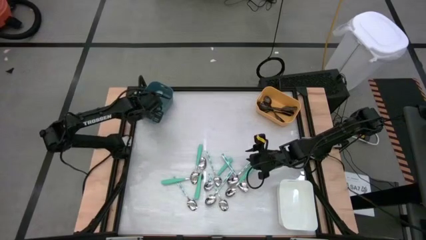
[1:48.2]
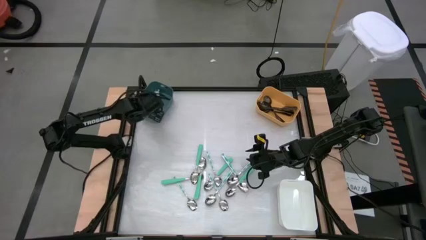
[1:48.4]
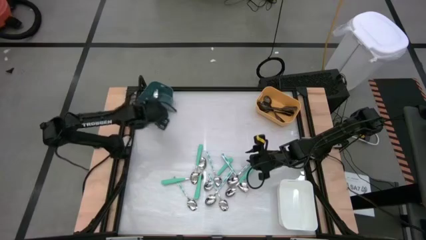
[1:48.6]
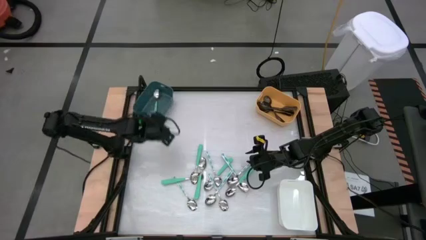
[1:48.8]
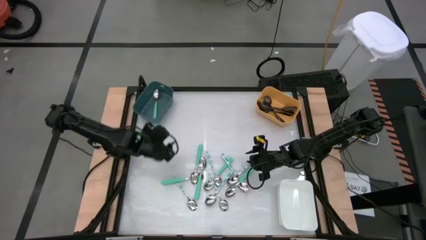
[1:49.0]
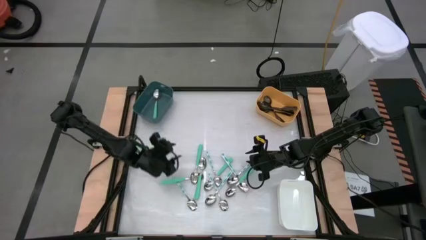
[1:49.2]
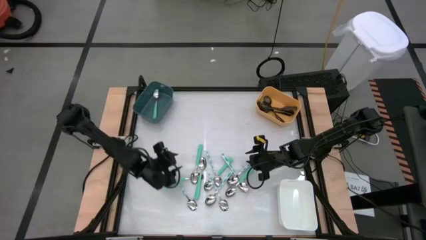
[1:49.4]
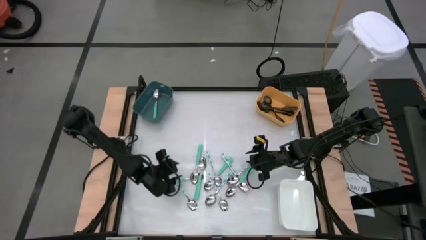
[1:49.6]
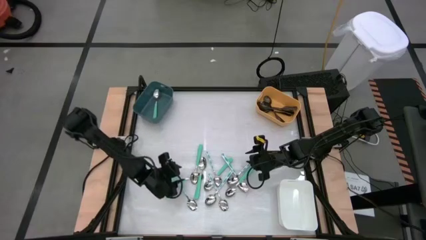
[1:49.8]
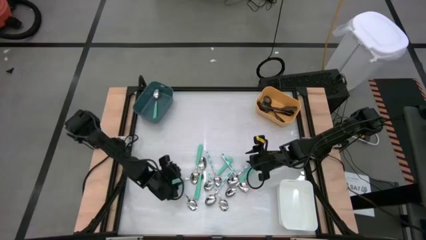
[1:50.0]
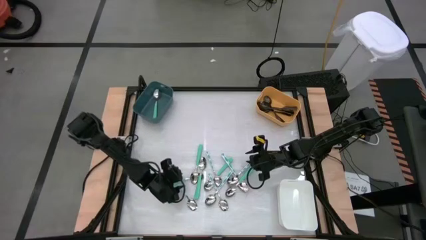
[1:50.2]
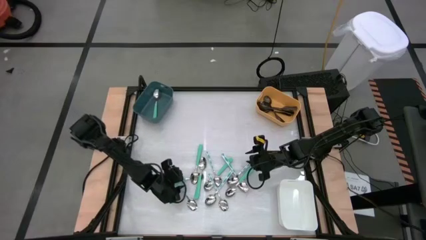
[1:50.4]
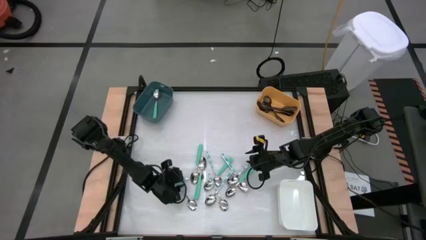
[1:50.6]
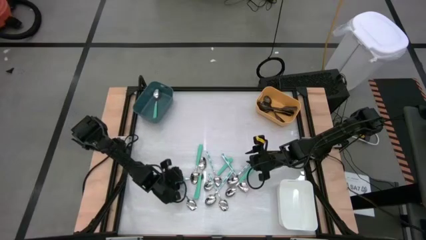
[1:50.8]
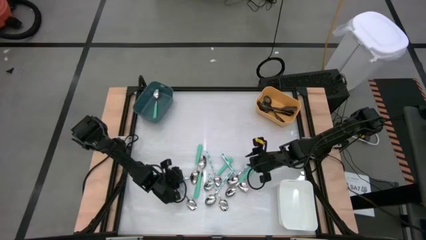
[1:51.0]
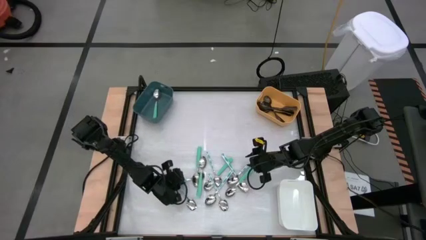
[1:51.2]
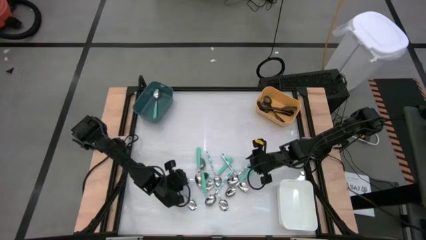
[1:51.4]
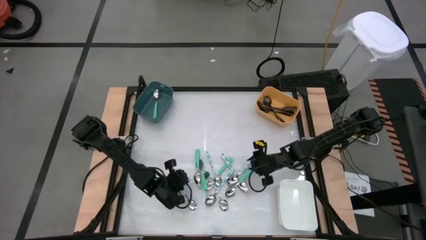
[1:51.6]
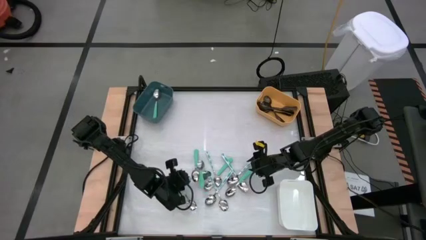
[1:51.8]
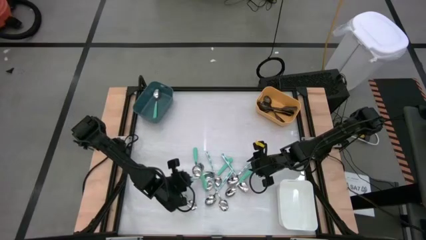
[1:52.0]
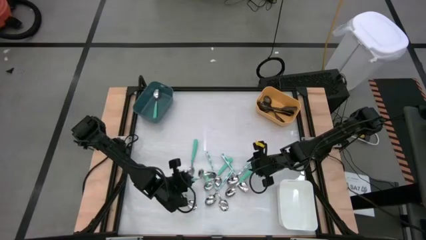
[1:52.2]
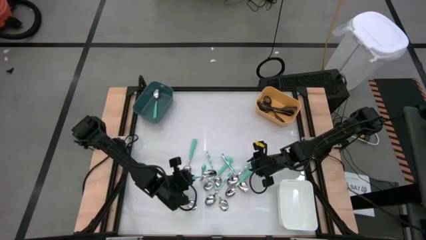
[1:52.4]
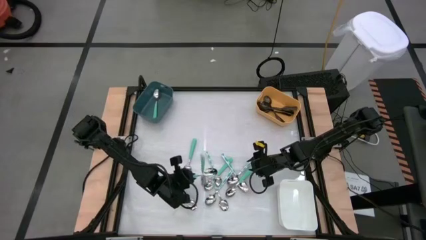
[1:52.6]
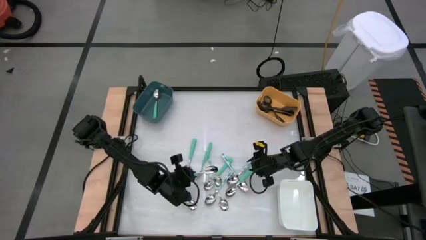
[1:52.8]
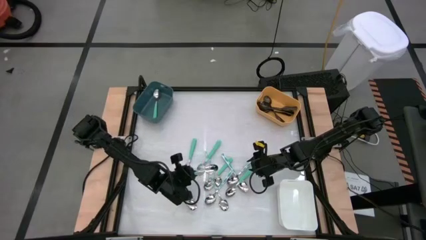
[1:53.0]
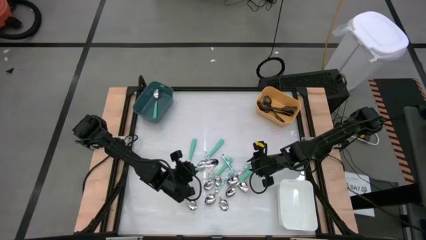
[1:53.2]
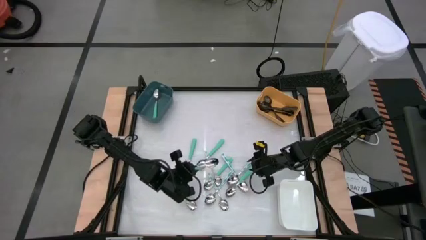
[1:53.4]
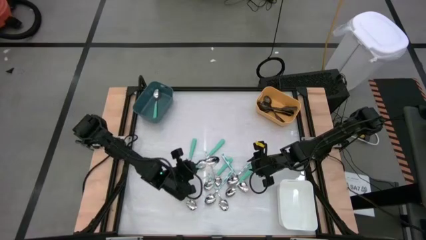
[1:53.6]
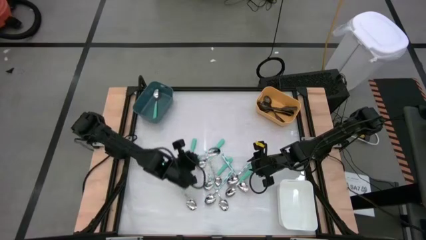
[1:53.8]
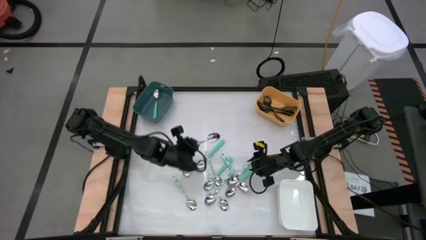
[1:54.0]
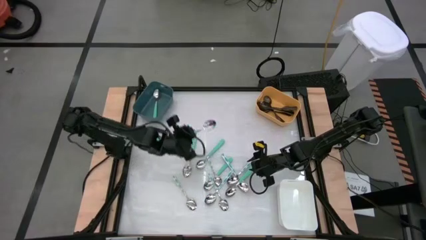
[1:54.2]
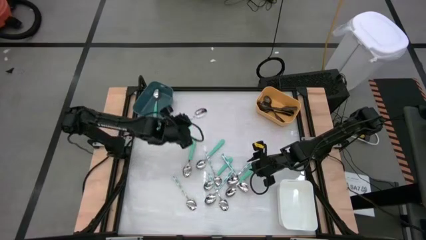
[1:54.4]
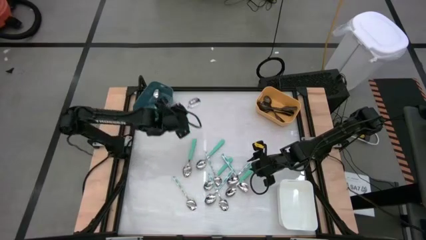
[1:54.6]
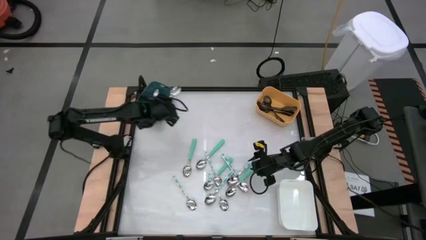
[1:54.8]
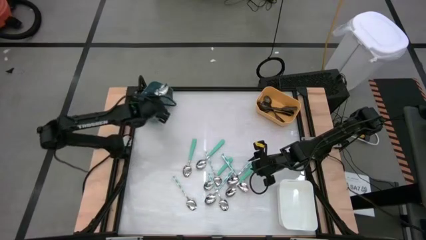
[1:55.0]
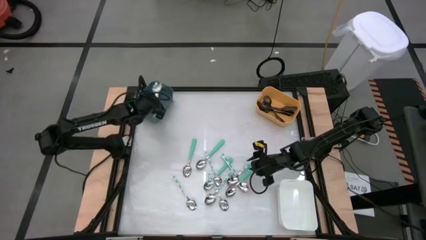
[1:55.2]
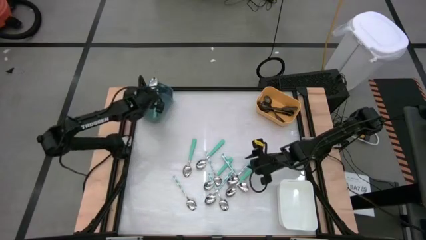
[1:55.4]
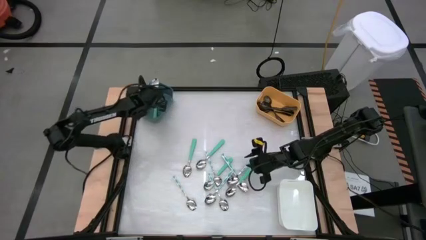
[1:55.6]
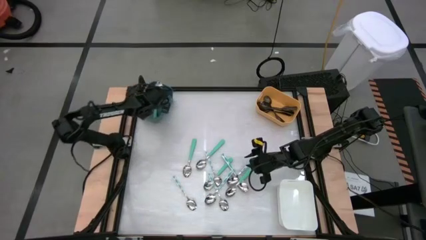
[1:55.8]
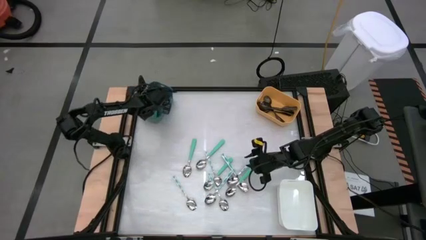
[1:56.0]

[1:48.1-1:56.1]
Task: Sort silverware by color (type)
Put the green spoon into the blue bin

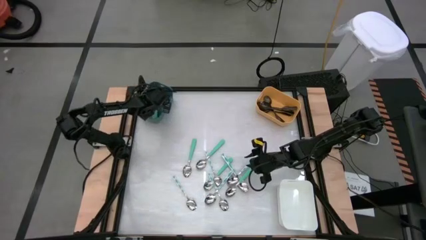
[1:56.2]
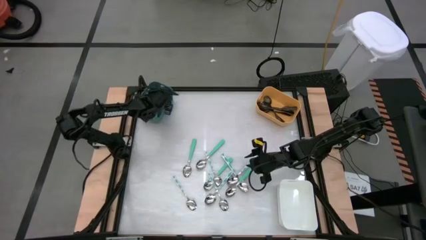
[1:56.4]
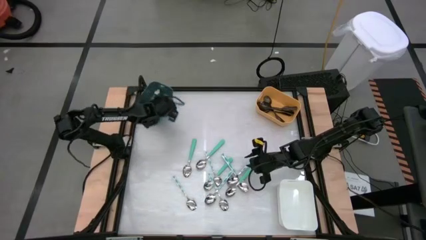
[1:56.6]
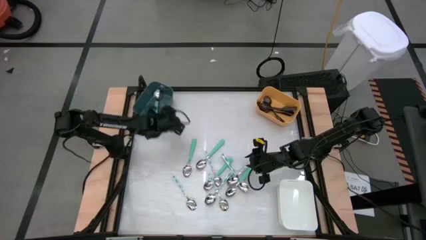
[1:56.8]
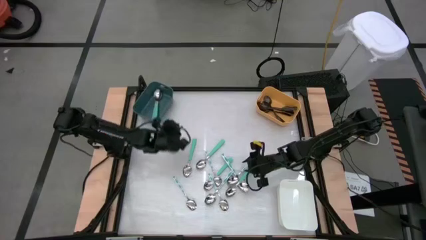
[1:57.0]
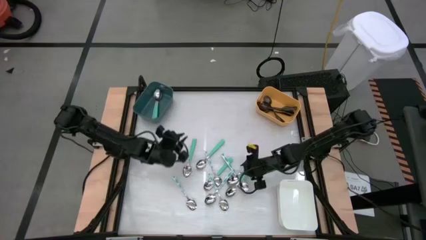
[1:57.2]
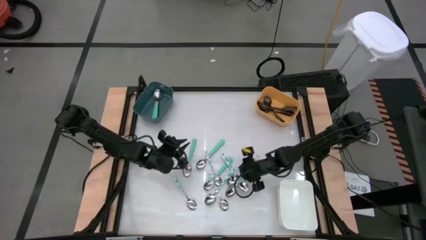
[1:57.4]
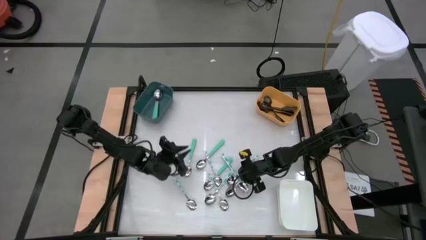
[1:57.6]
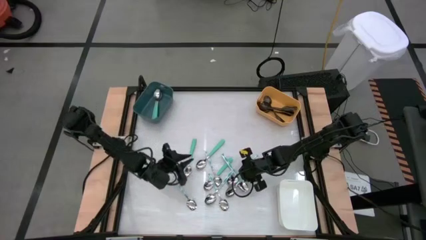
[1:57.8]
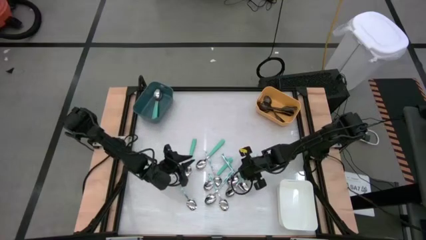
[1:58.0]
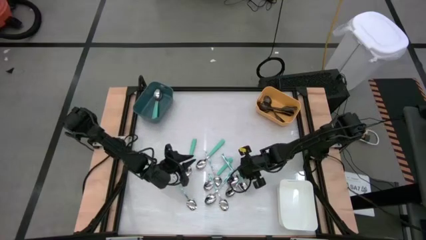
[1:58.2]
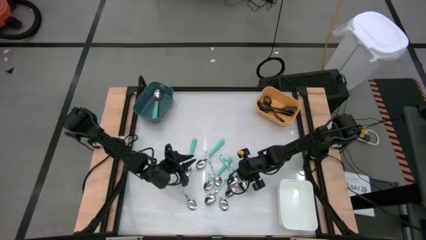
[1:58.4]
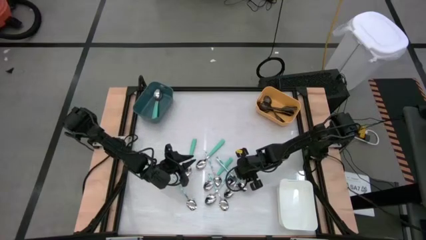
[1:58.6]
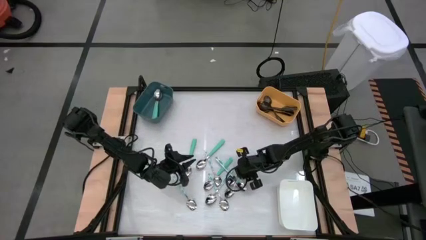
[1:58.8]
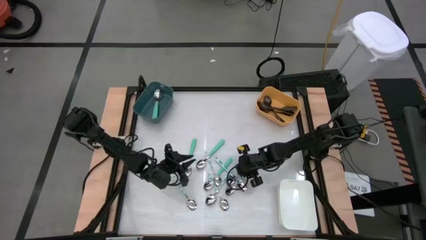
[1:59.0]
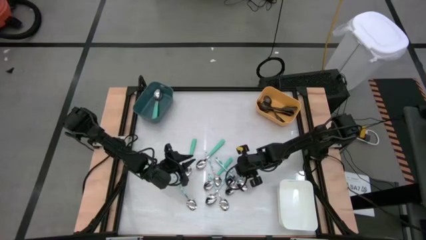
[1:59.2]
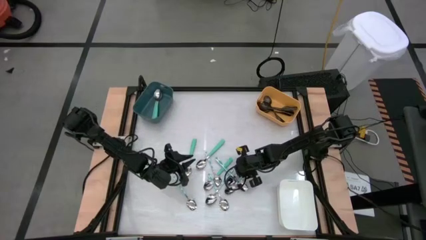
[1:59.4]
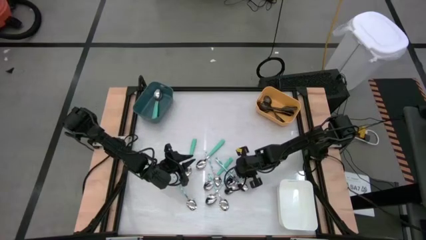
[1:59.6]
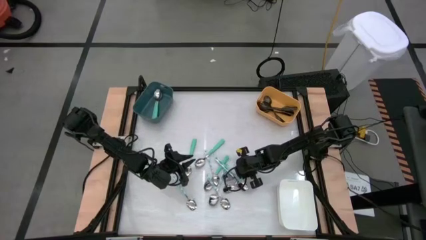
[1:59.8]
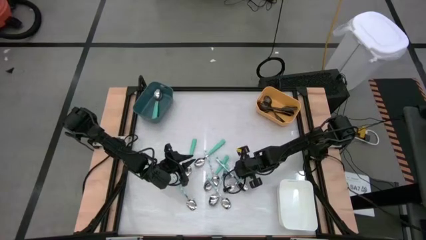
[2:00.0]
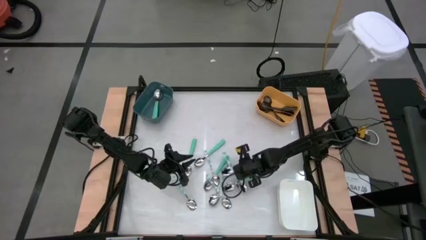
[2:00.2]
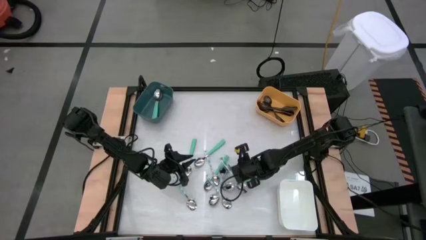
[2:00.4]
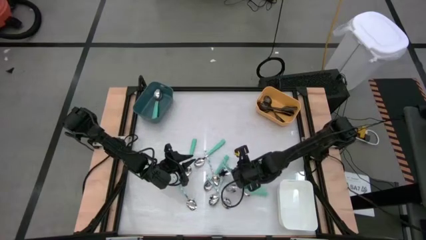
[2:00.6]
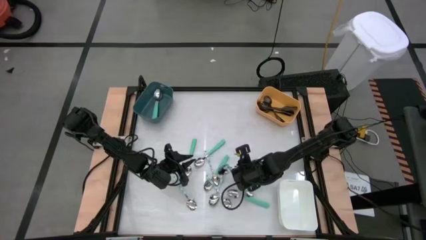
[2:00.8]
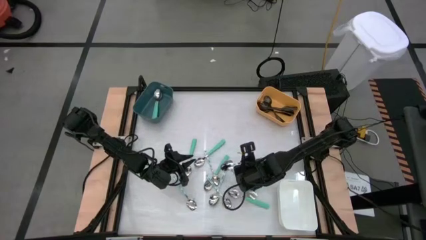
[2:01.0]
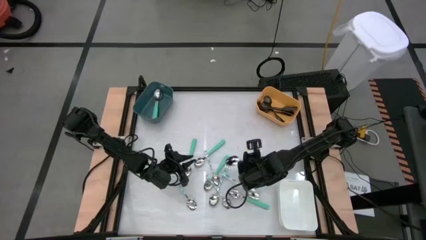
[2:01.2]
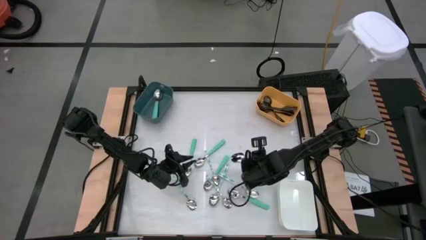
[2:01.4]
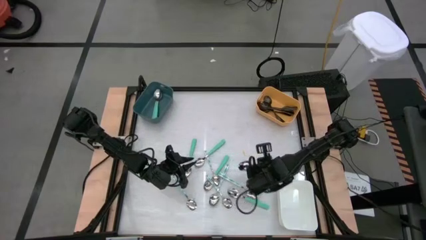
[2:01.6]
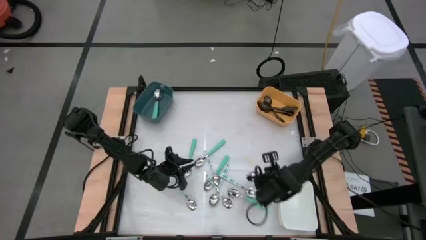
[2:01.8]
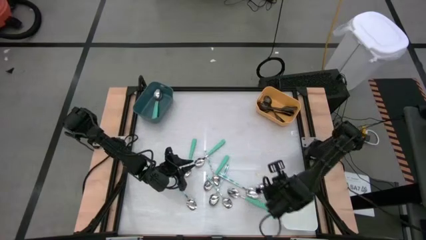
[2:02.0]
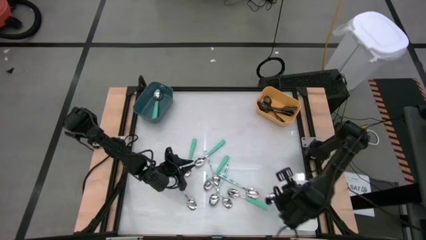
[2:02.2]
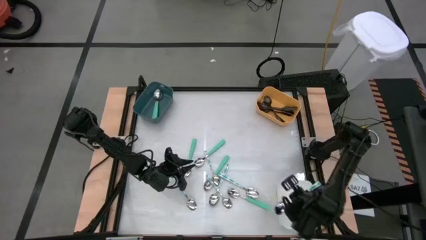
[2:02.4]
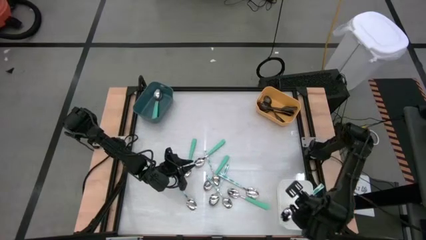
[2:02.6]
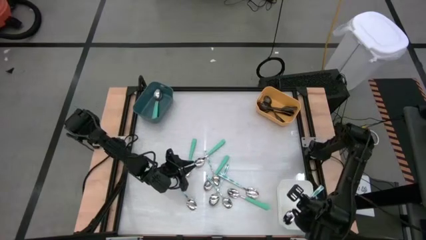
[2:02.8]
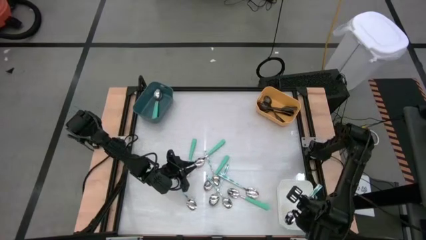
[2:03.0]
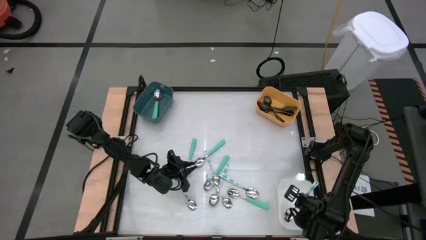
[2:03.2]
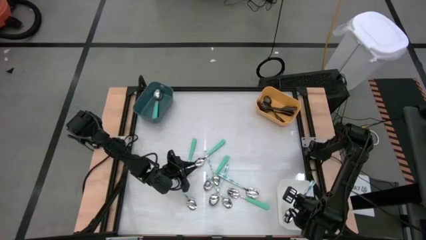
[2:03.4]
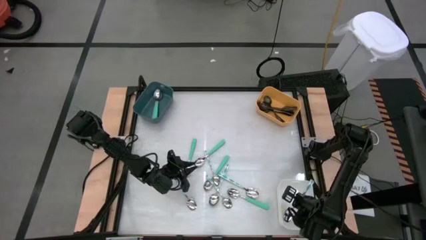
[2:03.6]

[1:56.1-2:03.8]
Put the patterned green spoon into the white bin
